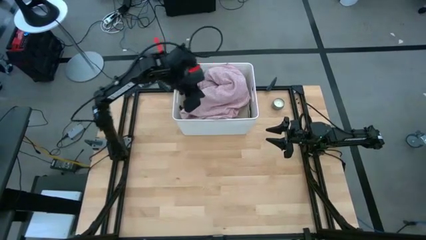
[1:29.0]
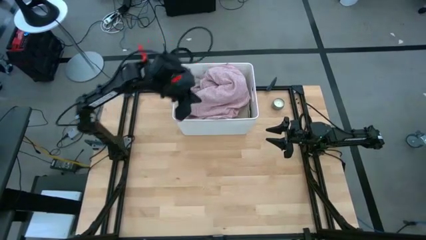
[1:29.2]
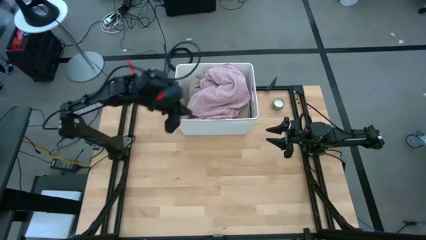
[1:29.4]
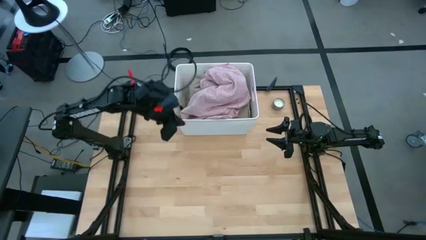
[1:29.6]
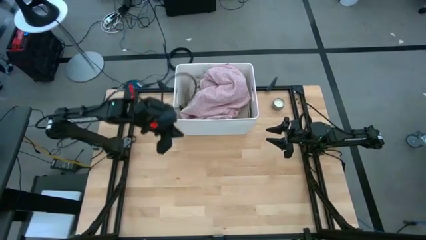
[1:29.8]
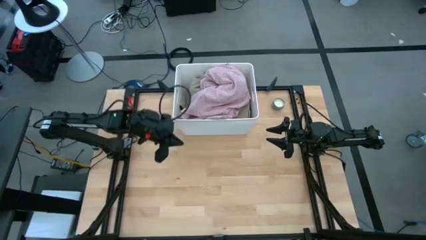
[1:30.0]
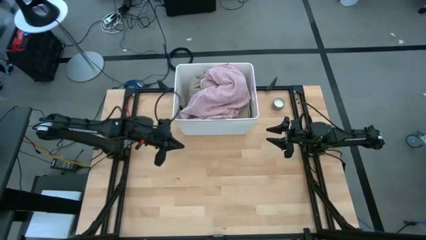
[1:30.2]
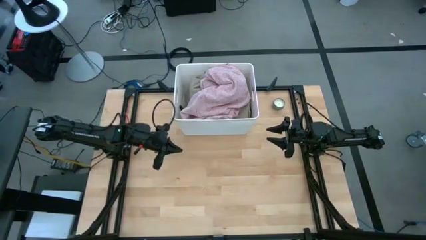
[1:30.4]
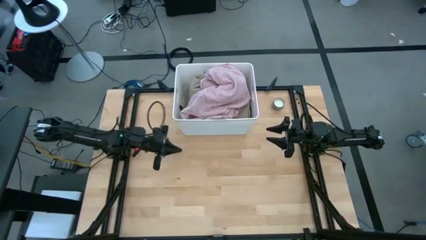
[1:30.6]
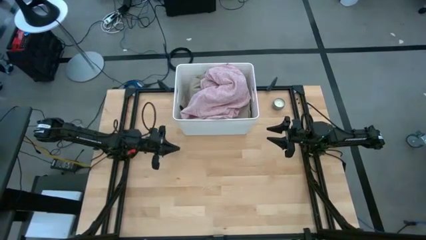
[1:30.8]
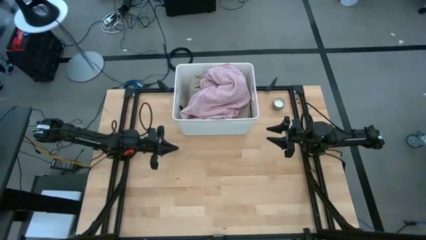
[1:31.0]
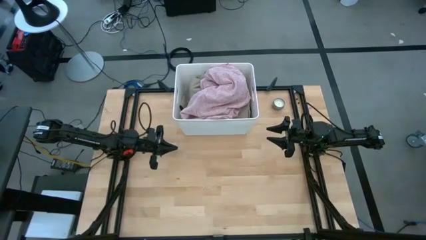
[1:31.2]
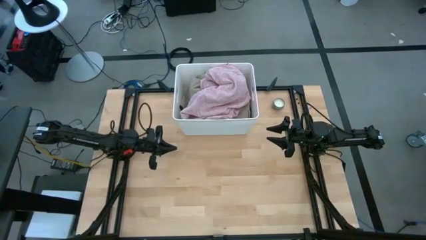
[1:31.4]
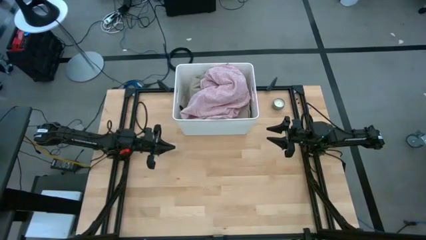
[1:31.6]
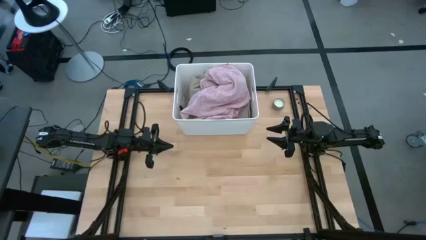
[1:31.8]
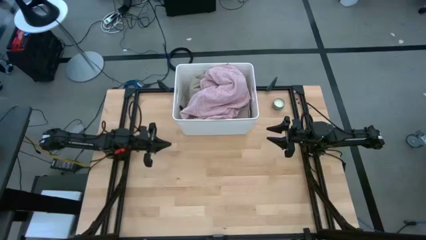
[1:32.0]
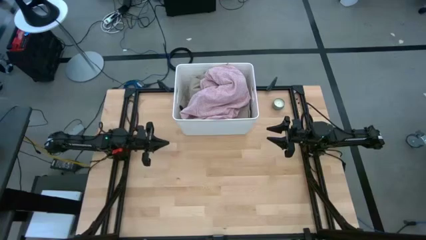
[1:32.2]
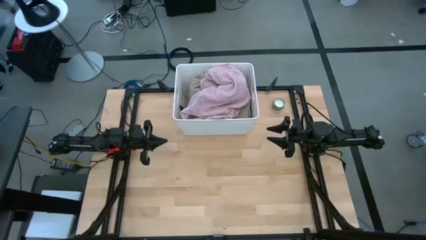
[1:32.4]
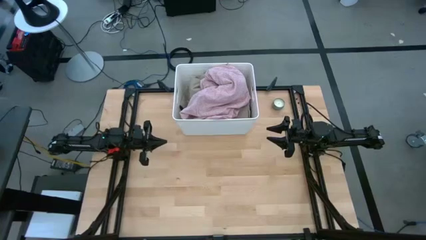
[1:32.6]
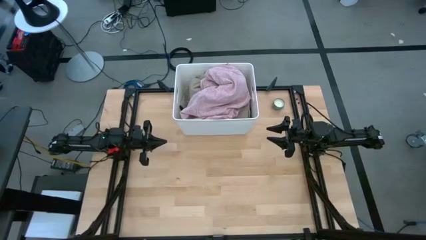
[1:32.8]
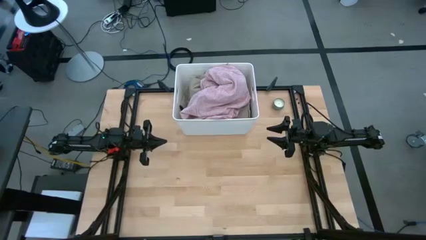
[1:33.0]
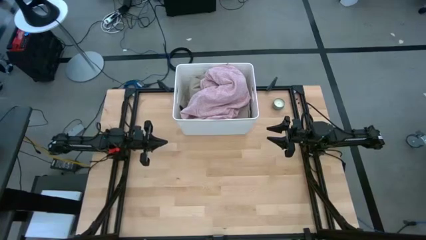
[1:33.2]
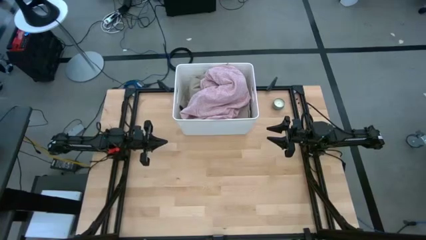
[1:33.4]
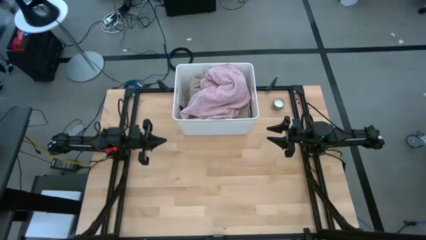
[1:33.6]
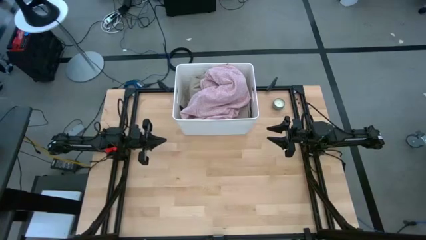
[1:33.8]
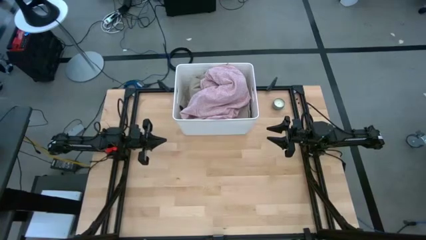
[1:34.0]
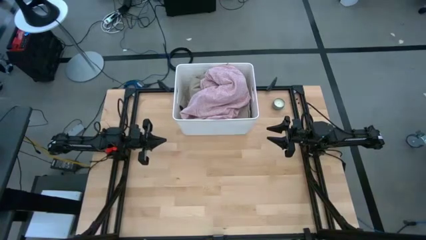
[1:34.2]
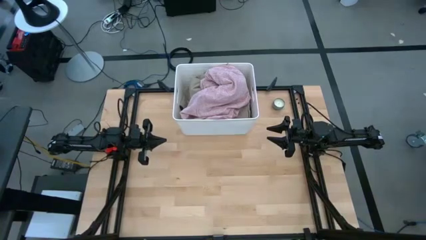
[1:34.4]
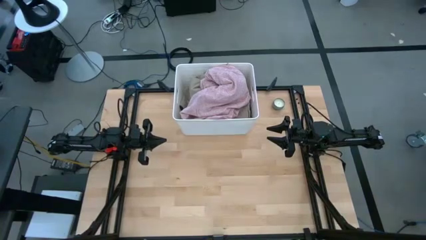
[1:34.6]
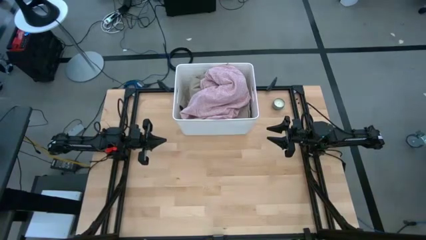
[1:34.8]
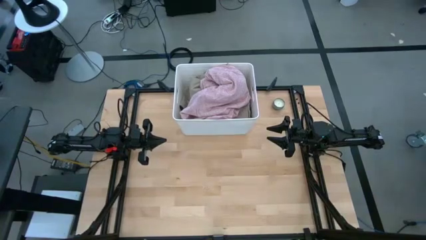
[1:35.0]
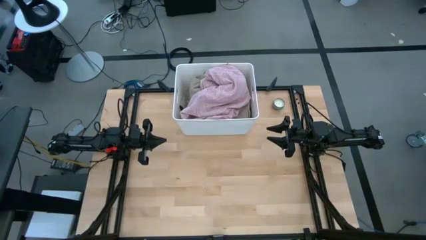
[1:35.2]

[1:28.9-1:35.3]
Task: Sort clothes
Return to Home Position

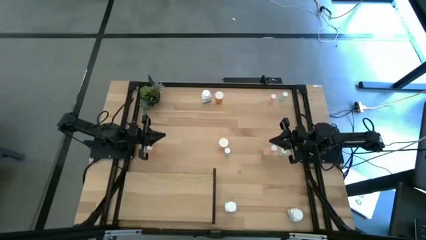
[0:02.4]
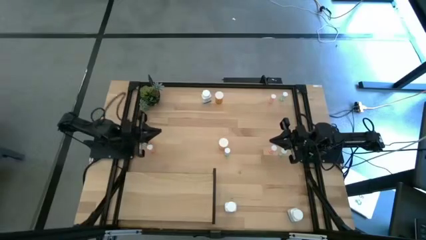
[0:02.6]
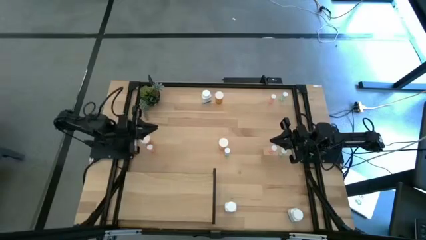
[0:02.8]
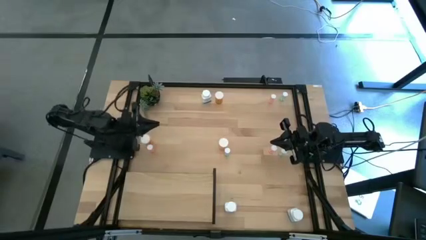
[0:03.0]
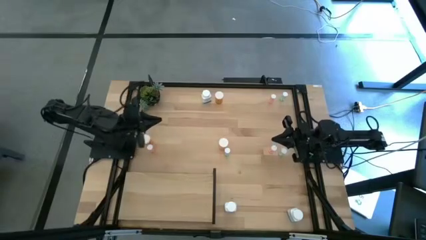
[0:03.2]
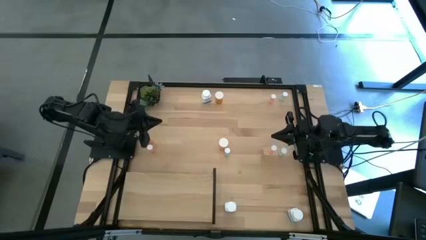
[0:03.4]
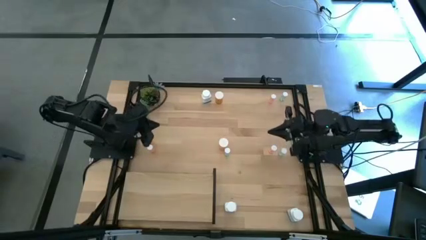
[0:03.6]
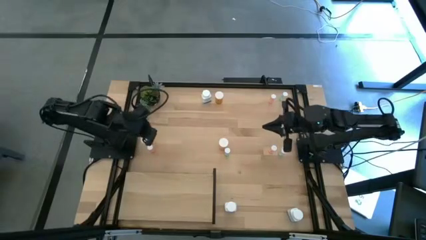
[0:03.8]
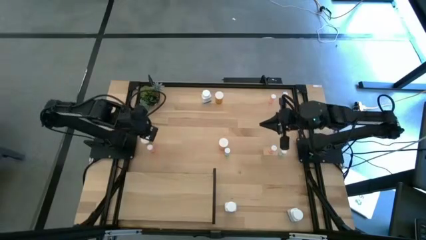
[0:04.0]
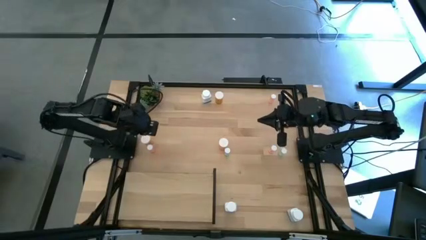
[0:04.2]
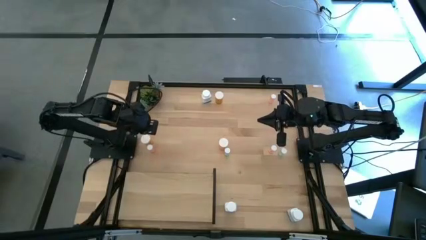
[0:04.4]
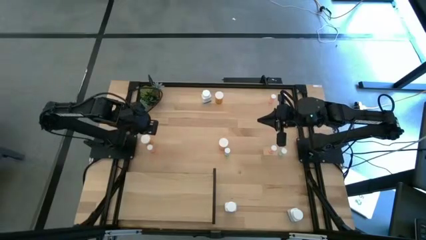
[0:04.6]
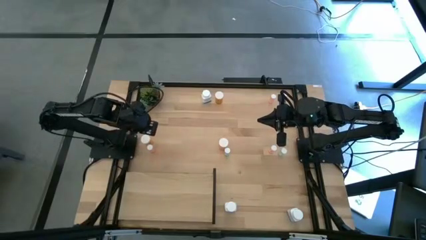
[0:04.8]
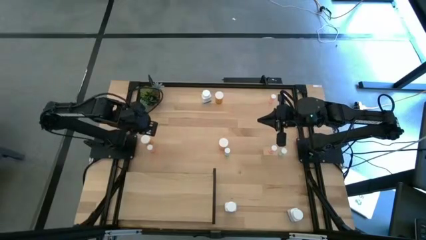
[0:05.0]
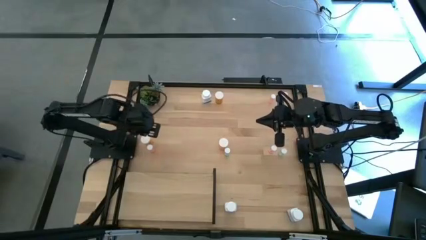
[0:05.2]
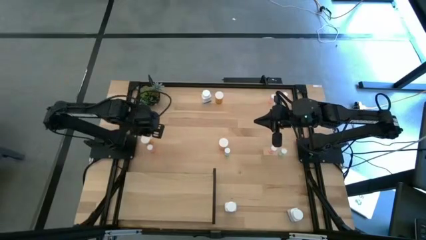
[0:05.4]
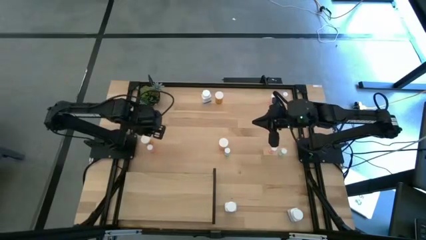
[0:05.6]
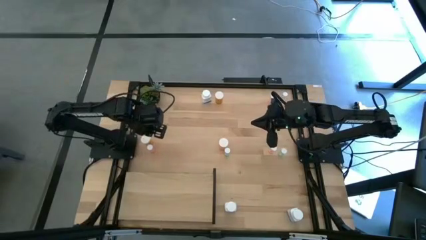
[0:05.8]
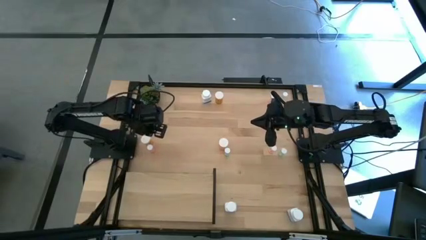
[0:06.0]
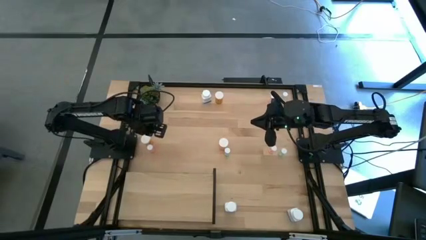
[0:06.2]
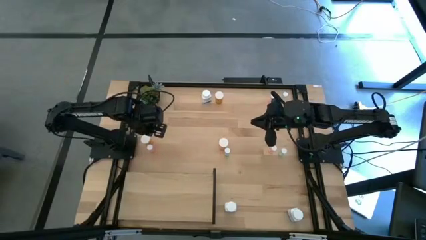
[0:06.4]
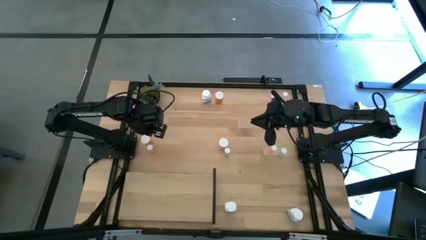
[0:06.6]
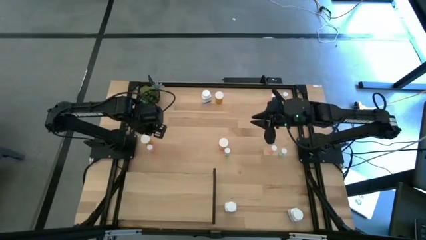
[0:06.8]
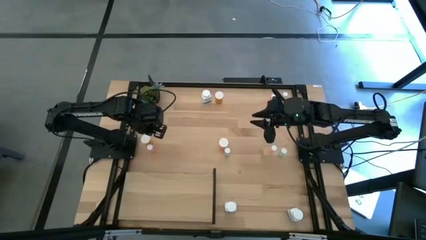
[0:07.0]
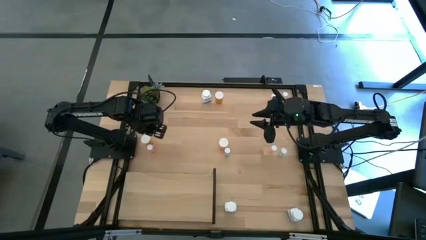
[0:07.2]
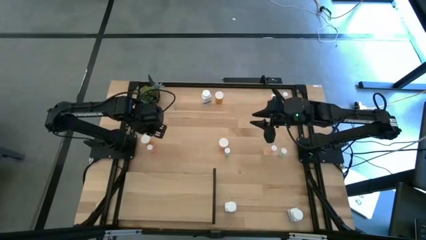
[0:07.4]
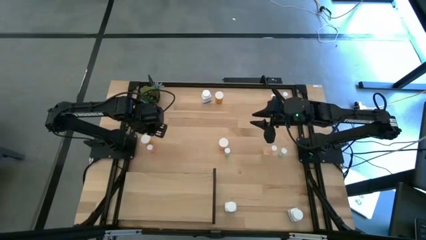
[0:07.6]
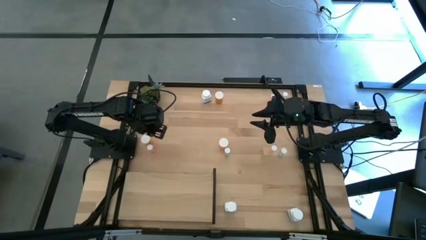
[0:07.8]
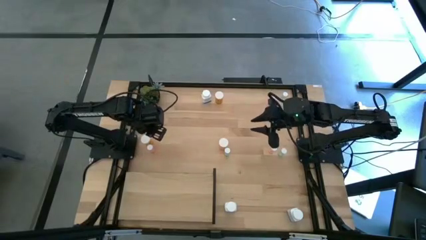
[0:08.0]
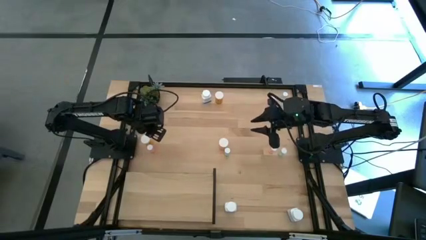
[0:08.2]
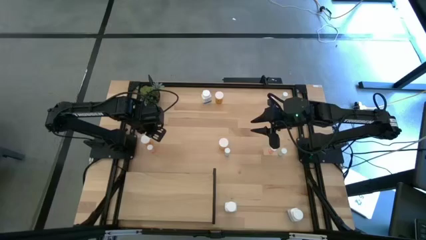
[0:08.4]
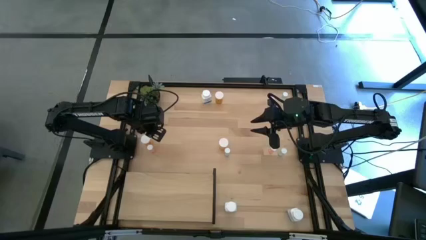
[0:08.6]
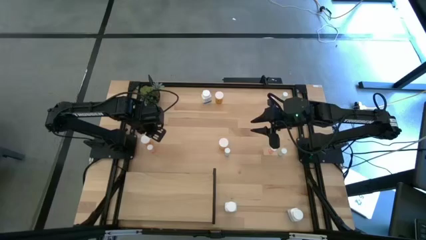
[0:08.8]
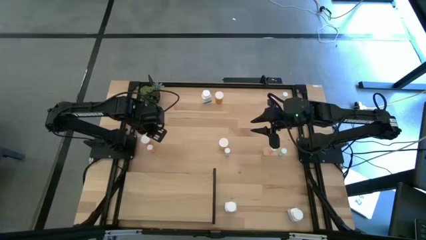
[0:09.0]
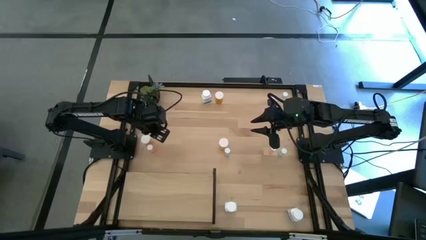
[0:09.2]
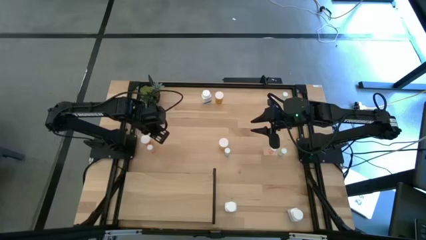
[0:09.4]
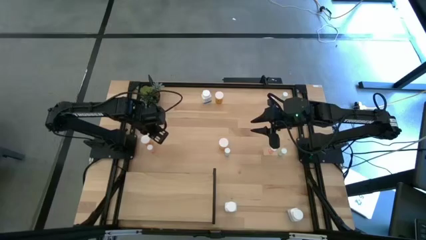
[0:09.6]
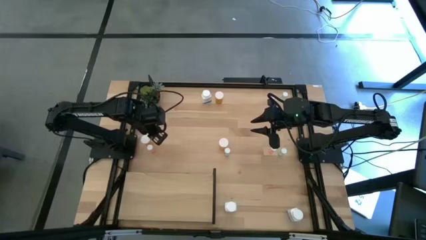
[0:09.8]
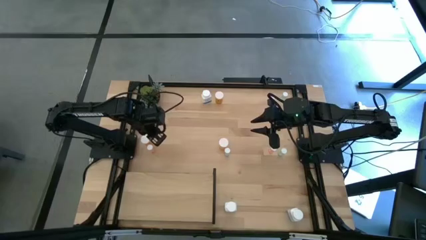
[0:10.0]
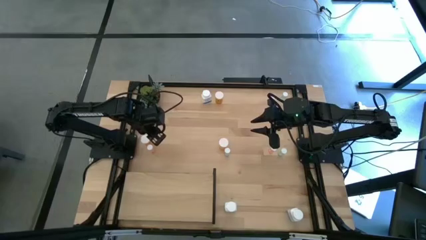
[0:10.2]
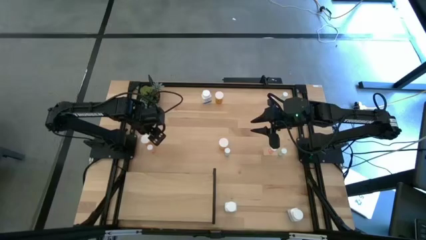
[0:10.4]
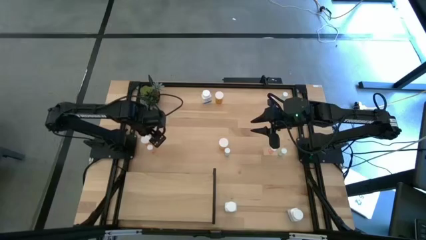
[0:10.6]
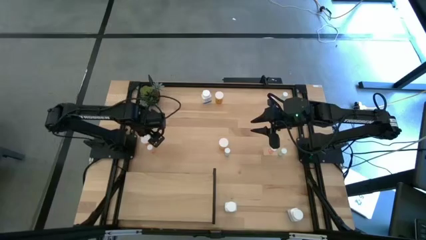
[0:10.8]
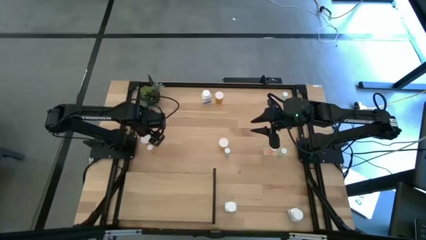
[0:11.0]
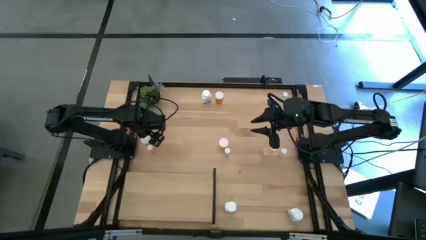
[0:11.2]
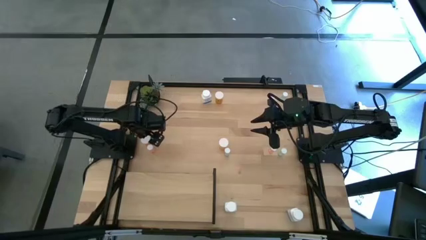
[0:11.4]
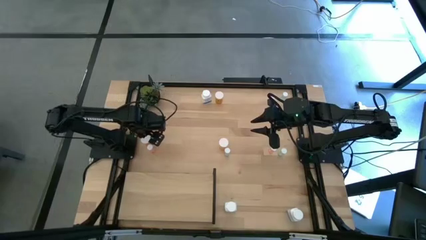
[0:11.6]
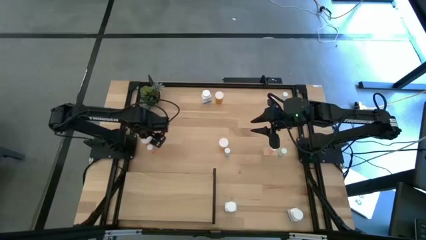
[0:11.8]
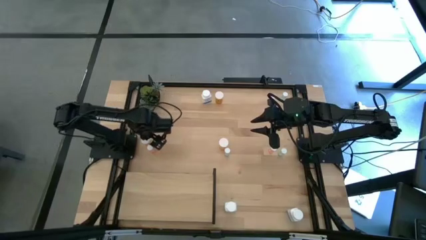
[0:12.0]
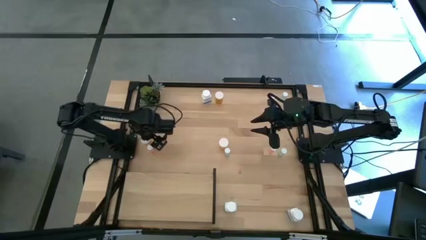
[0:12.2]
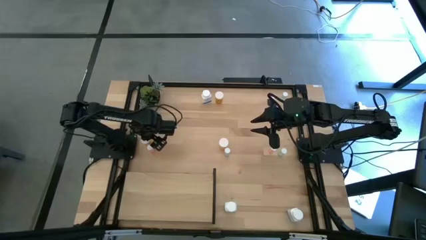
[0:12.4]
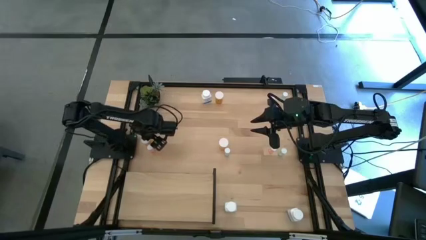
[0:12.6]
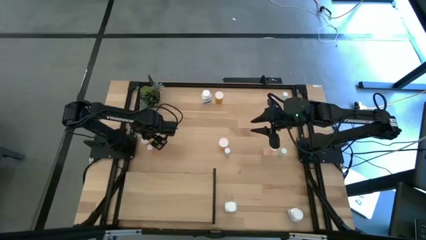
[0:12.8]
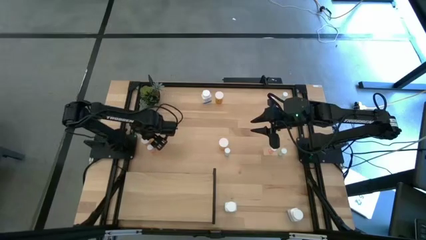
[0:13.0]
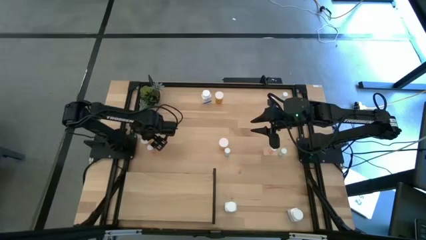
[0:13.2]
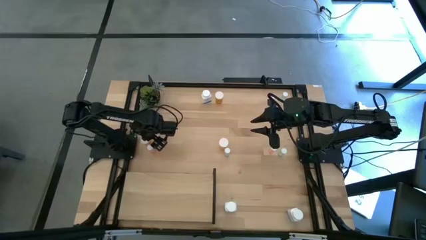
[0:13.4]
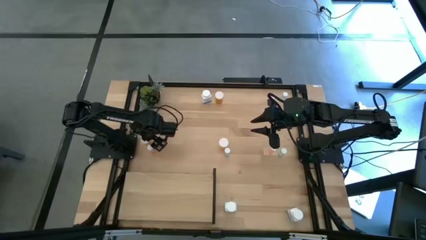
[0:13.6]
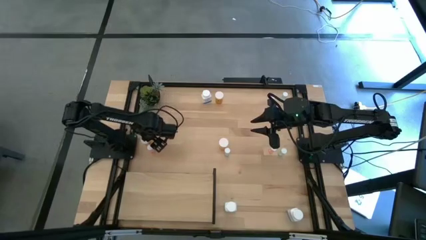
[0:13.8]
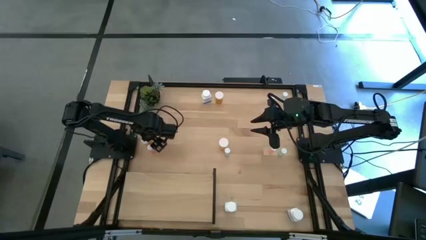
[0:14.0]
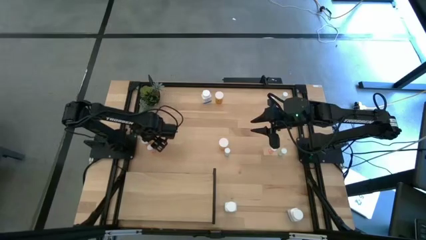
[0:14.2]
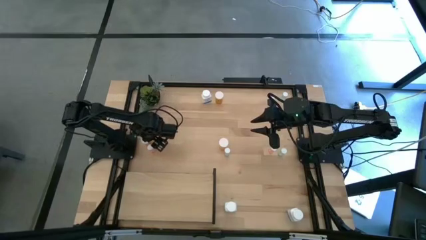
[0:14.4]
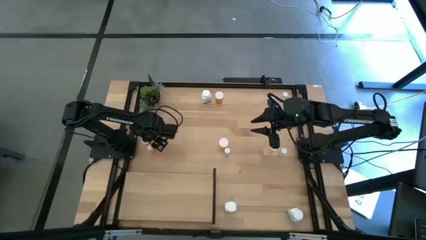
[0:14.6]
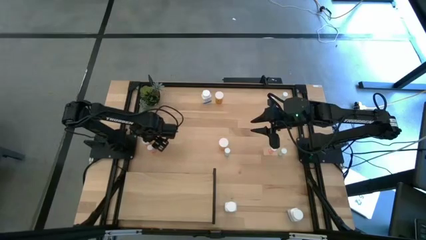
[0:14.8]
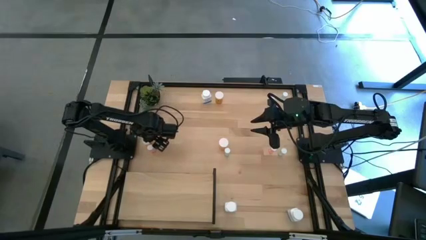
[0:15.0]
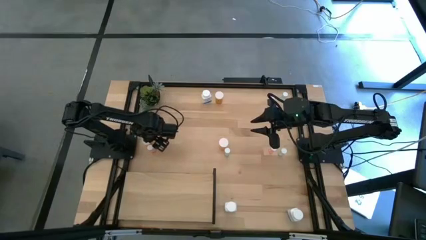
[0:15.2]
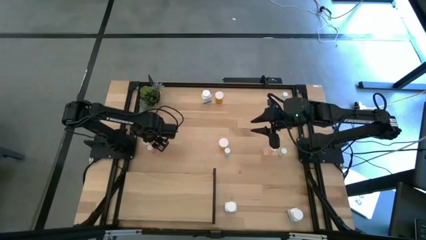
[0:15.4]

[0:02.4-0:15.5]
Task: Pick and place medicine bottles onto shelf by color
Put the bottom left big orange pill bottle on the shelf
